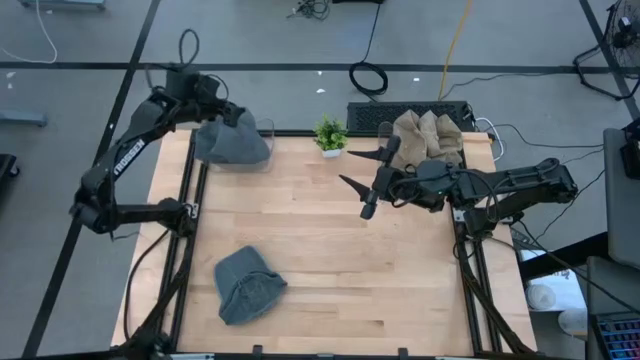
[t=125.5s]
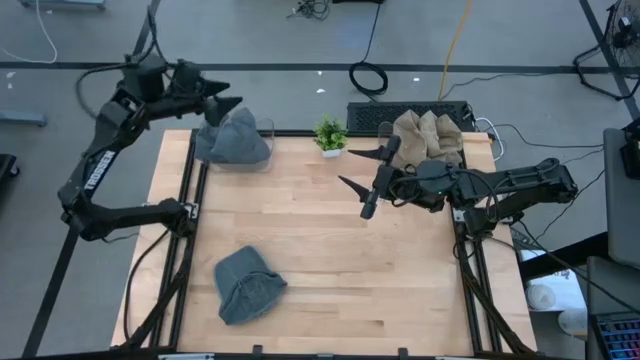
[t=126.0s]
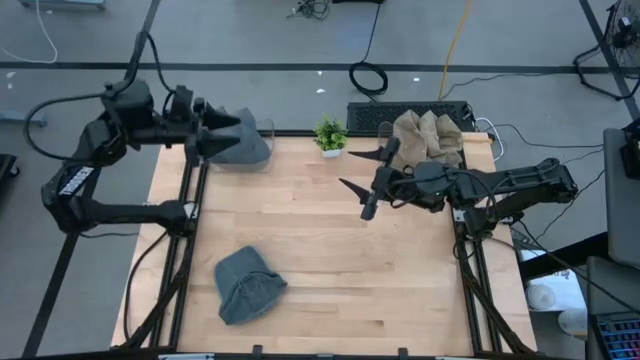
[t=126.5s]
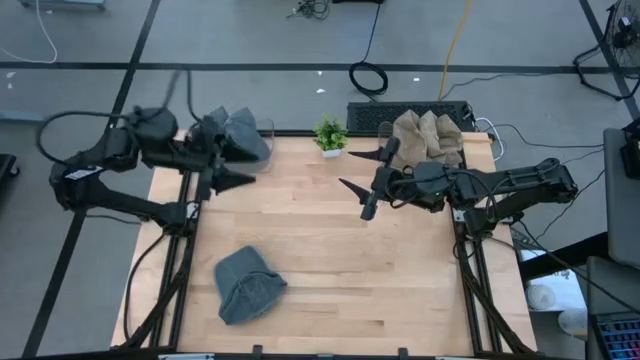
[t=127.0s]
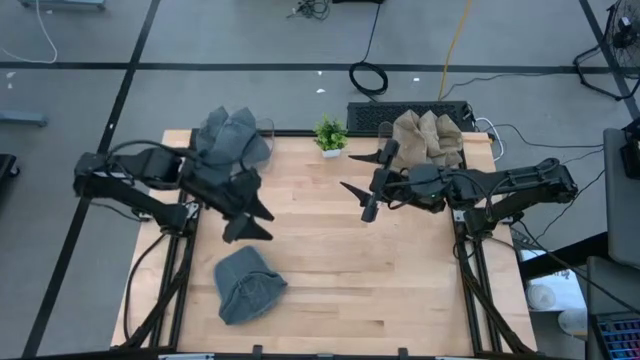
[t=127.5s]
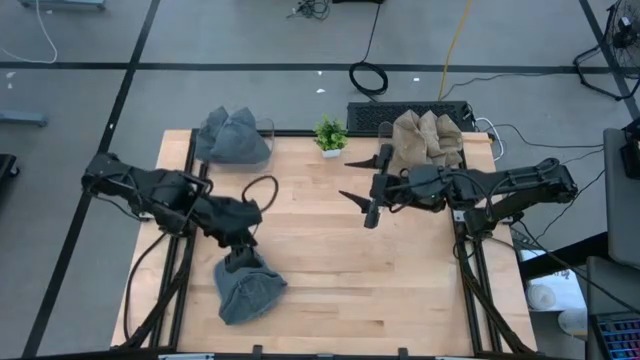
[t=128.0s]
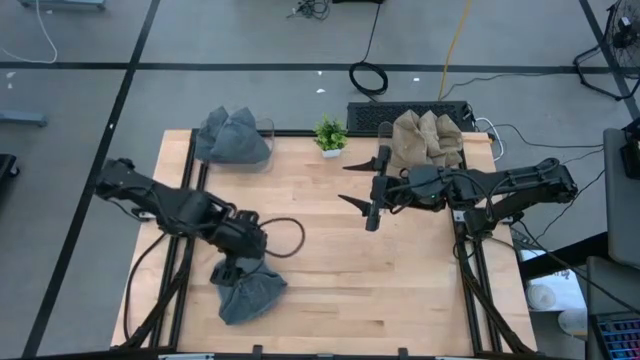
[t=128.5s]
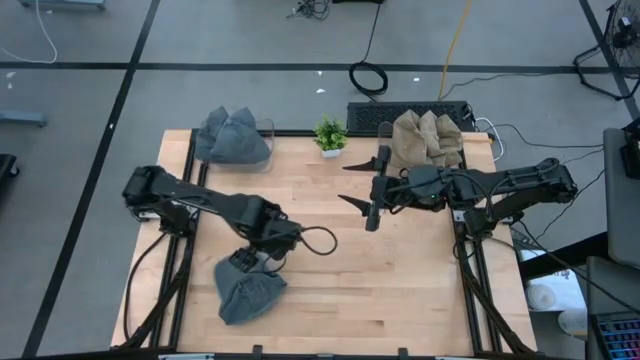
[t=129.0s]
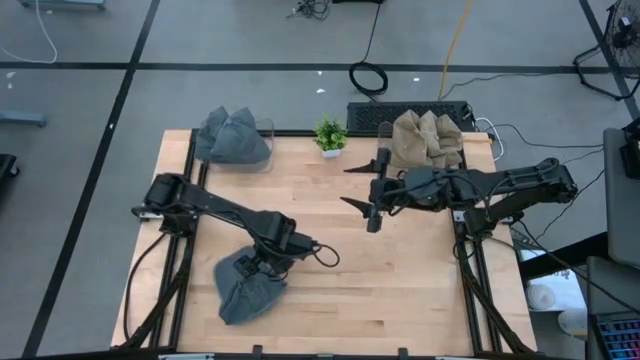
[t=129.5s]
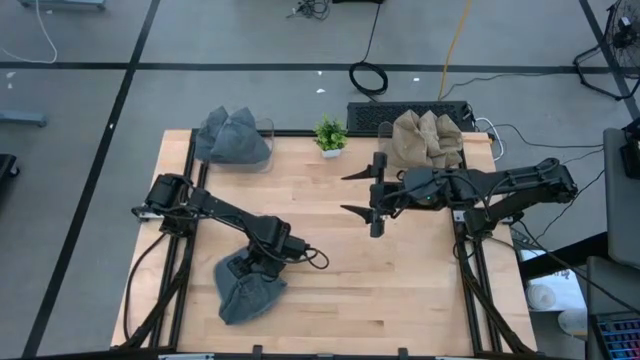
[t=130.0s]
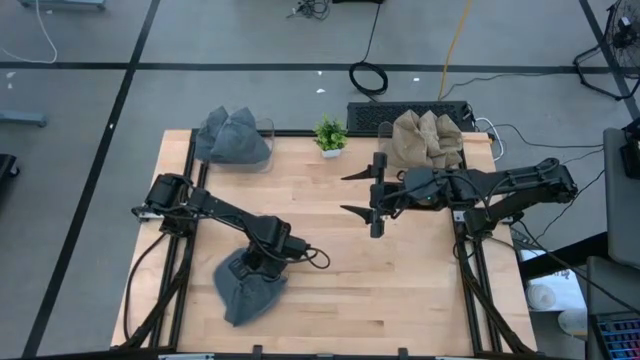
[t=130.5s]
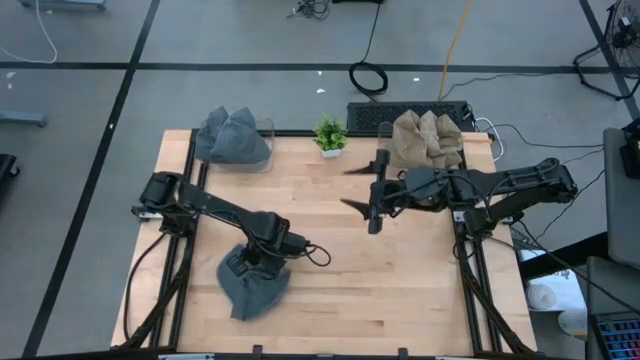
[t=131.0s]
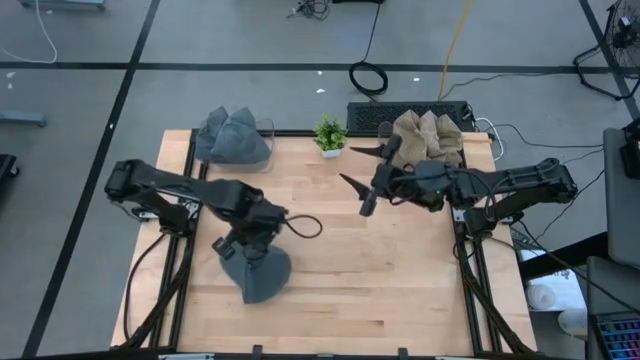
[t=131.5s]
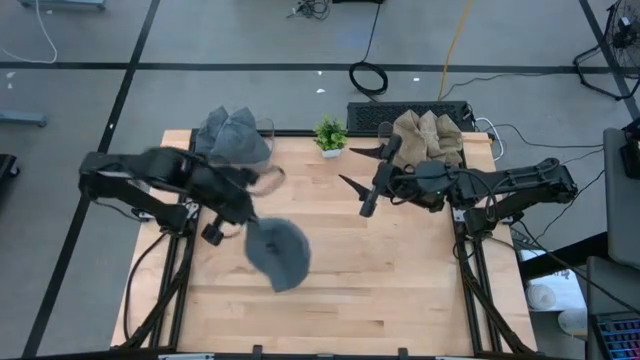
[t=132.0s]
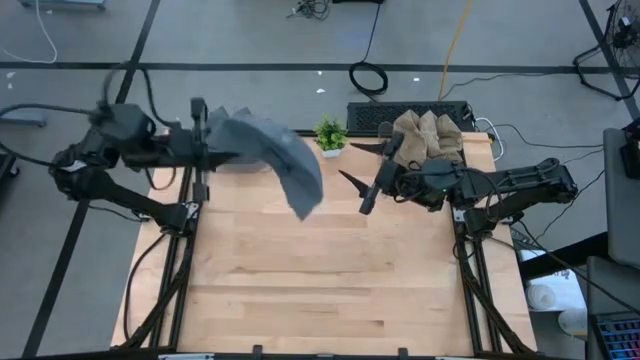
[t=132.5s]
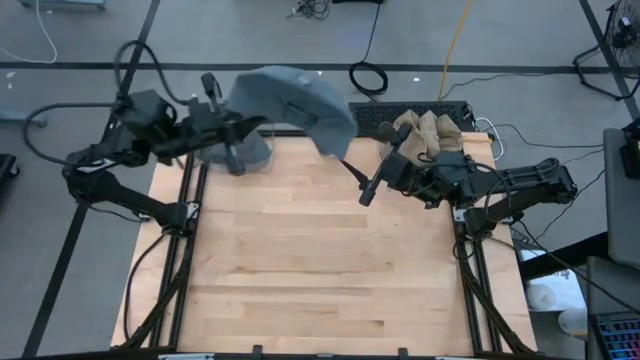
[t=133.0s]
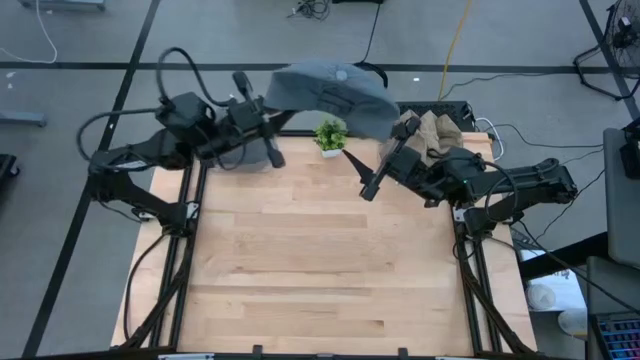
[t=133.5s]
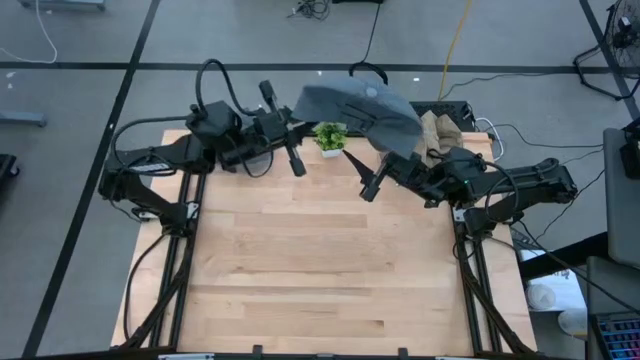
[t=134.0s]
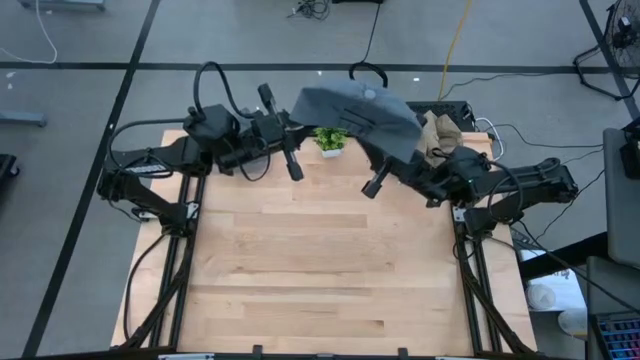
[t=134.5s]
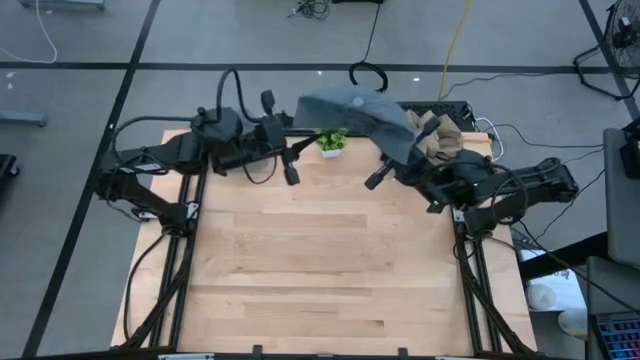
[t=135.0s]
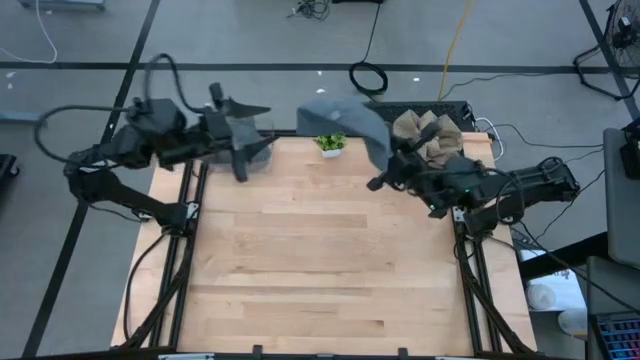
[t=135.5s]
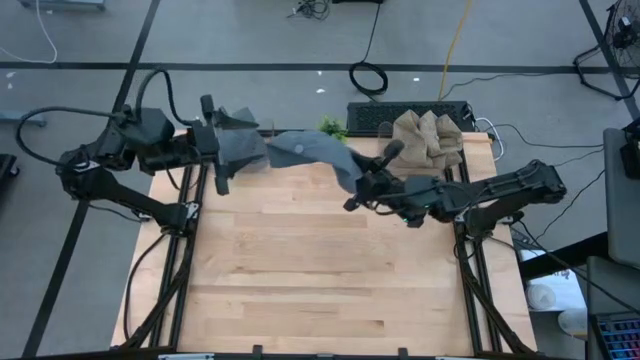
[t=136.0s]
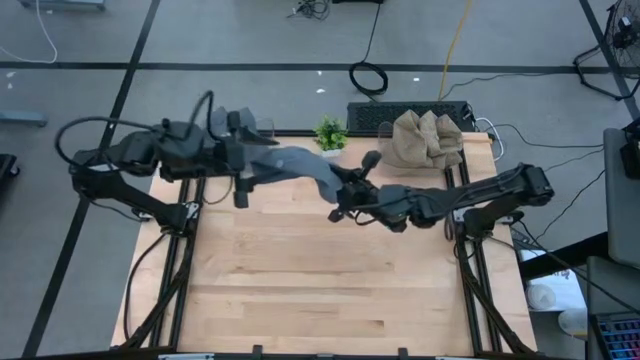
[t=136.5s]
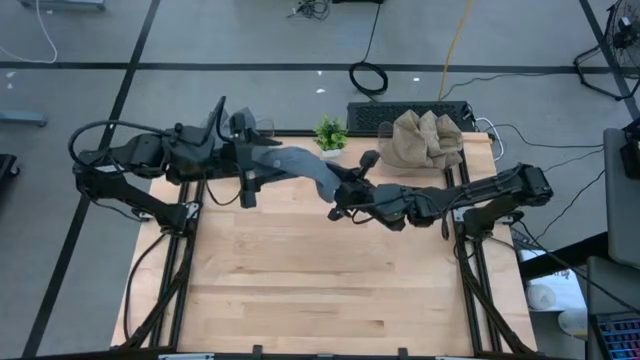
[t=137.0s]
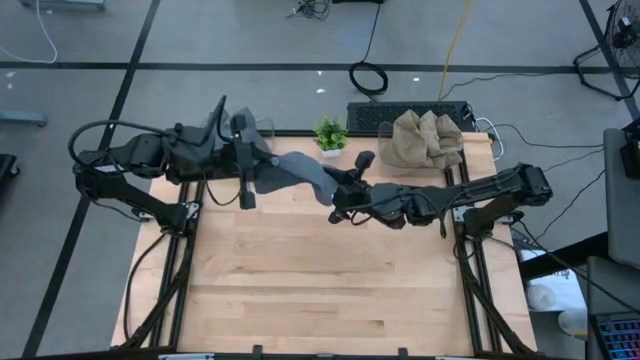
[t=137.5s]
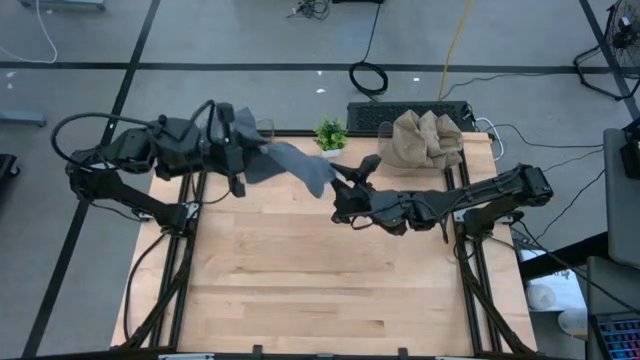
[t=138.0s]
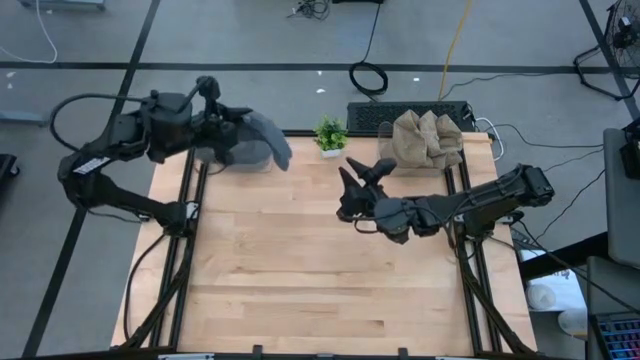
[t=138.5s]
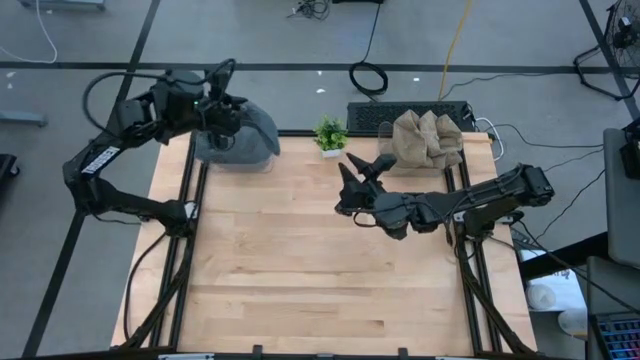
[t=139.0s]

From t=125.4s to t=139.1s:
Task: Pick & Place hat
Put the blue cap into the left transparent bin

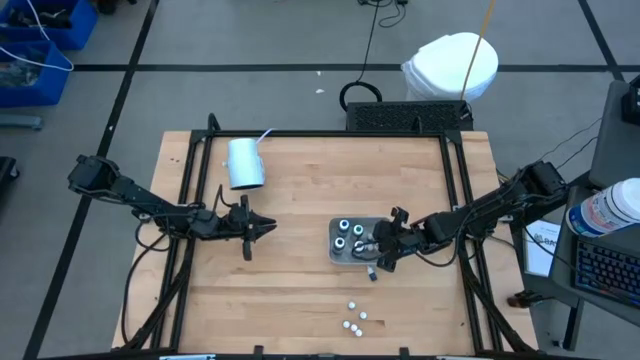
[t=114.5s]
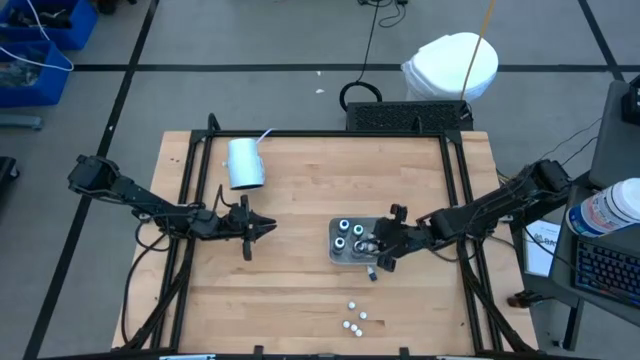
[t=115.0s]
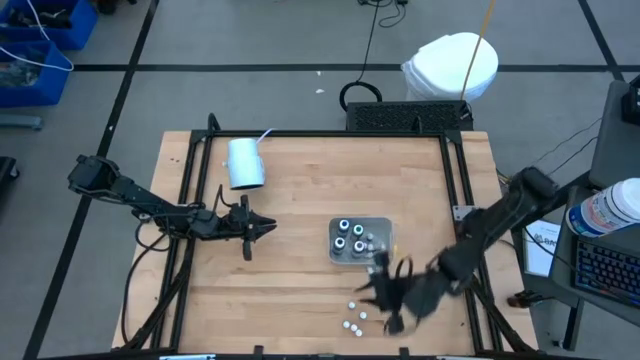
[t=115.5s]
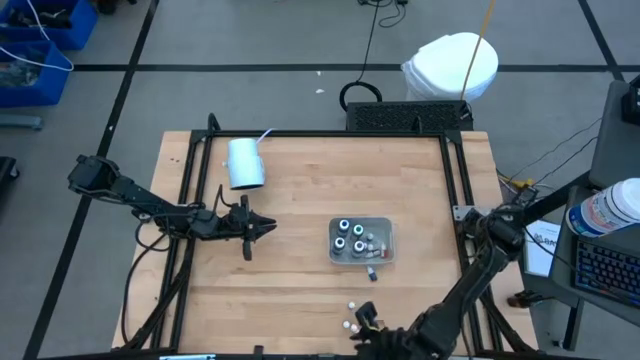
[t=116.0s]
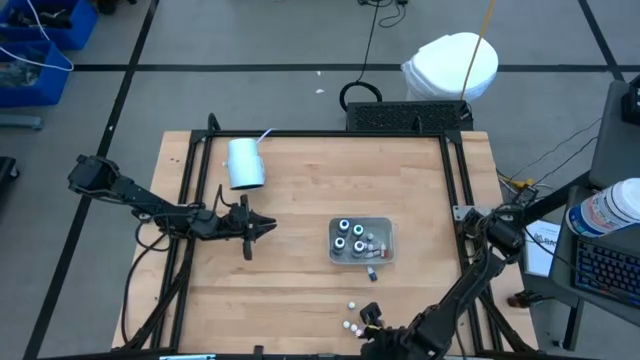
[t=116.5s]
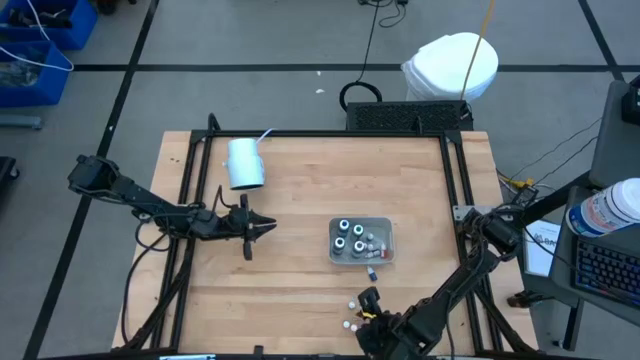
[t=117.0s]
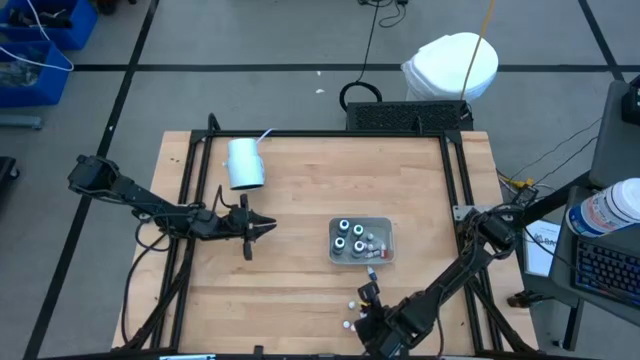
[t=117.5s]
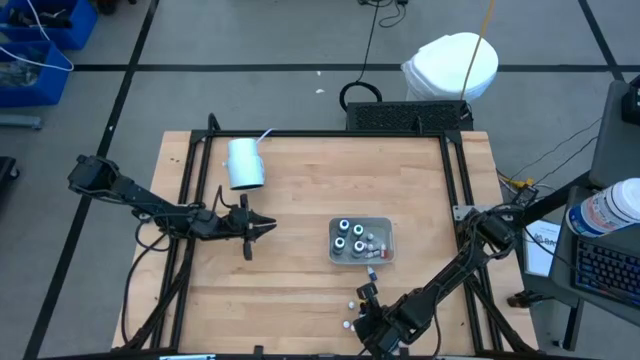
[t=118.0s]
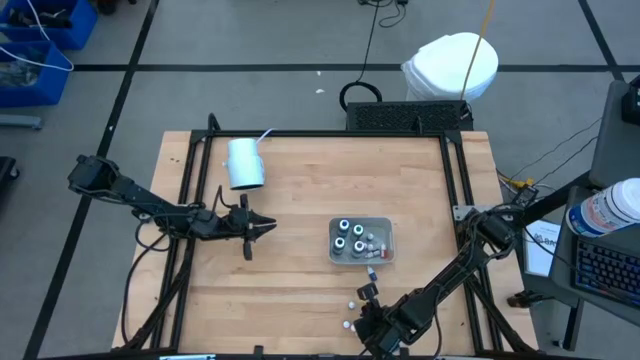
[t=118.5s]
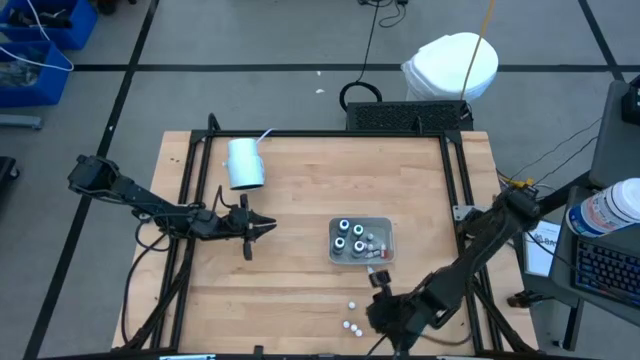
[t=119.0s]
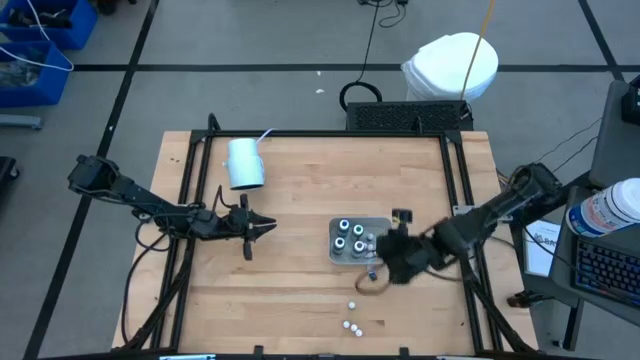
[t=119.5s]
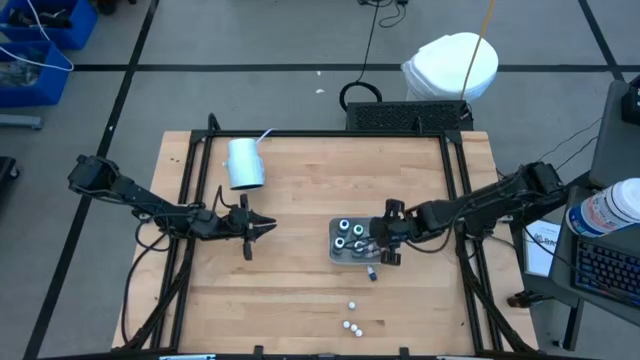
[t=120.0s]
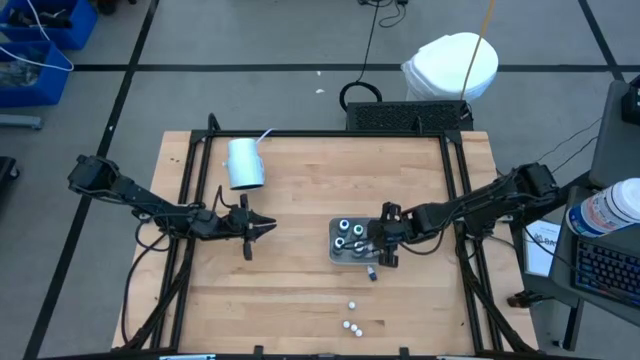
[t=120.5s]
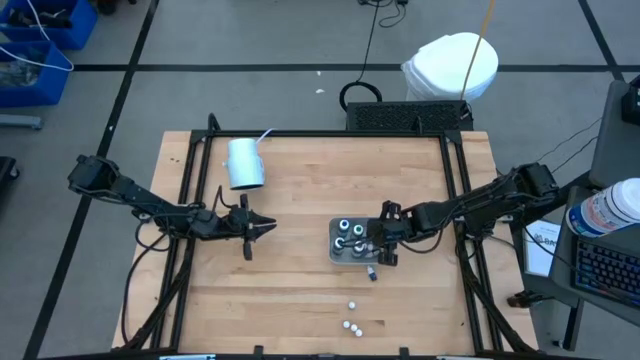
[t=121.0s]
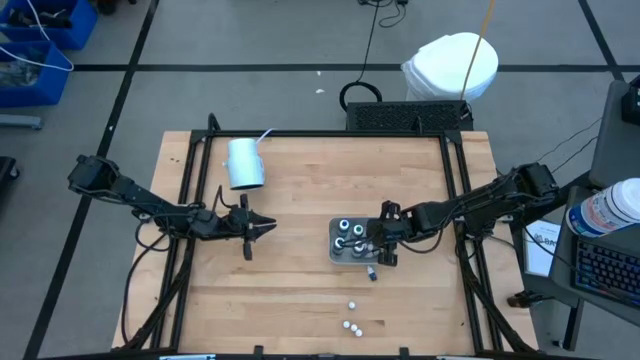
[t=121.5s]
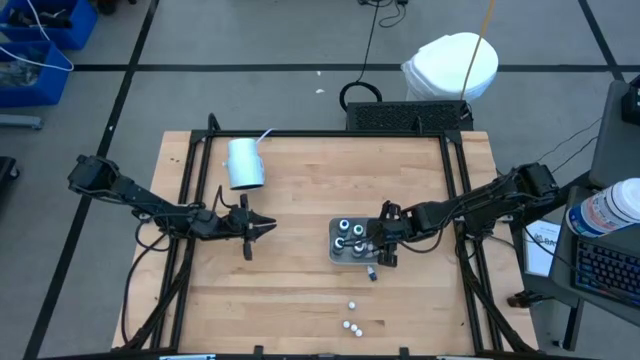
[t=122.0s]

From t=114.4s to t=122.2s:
Task: Pick & Place food coloring
Put the small purple food coloring bottle into the gray bin
